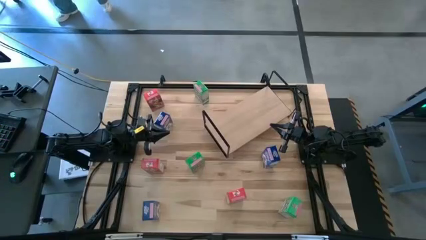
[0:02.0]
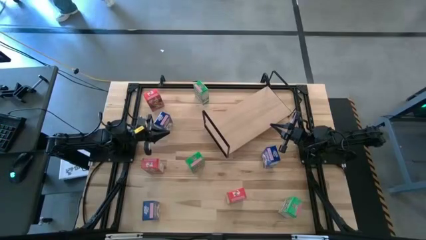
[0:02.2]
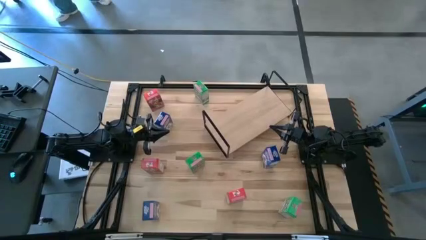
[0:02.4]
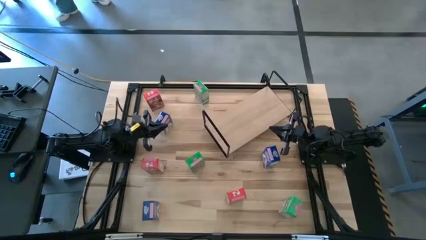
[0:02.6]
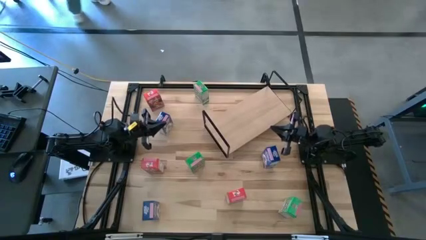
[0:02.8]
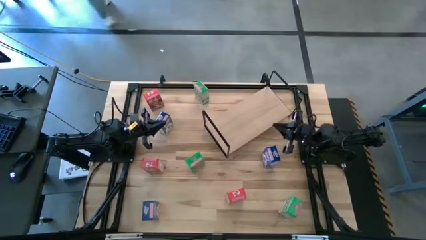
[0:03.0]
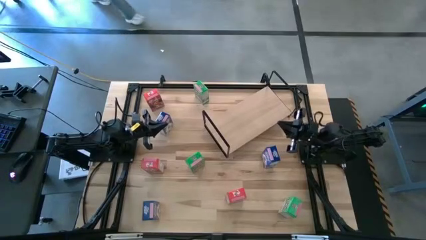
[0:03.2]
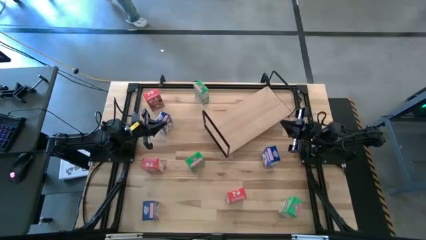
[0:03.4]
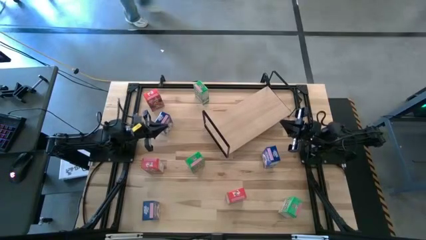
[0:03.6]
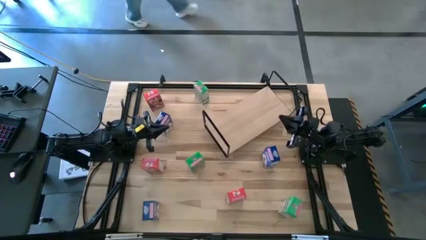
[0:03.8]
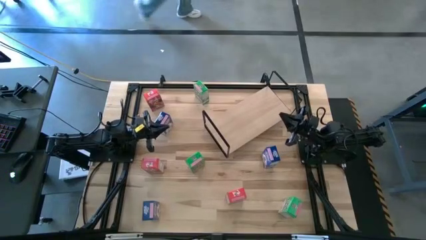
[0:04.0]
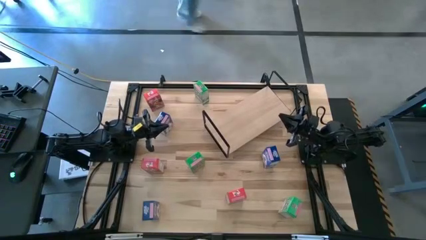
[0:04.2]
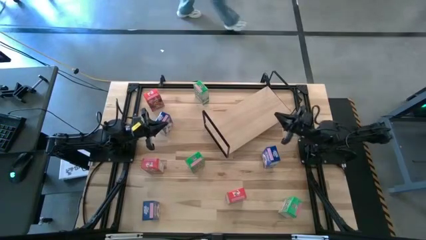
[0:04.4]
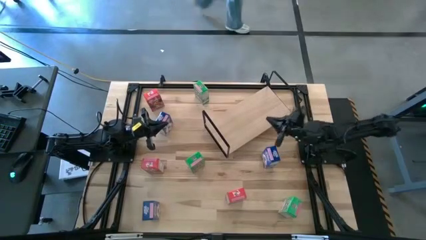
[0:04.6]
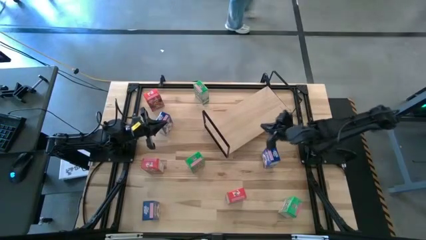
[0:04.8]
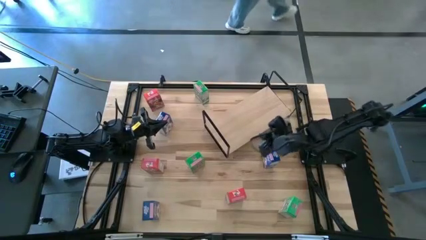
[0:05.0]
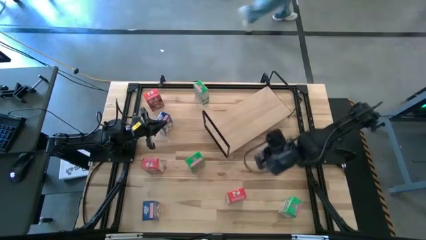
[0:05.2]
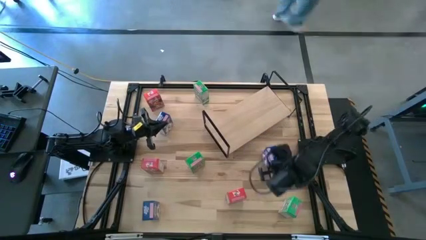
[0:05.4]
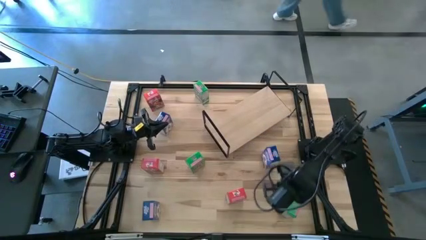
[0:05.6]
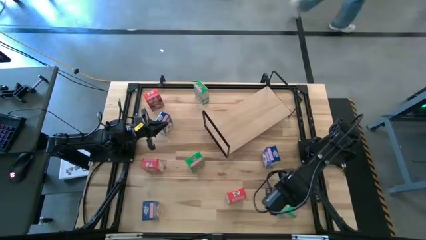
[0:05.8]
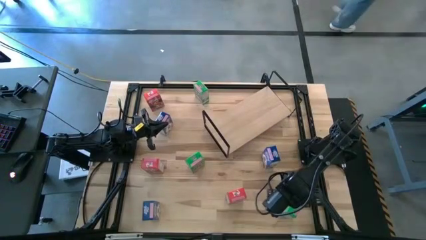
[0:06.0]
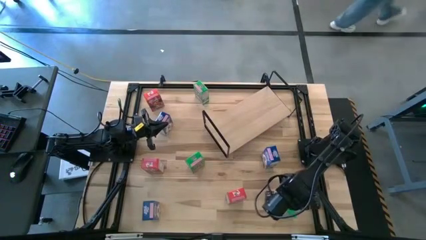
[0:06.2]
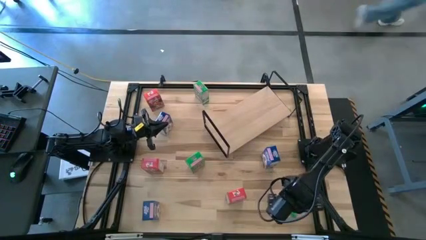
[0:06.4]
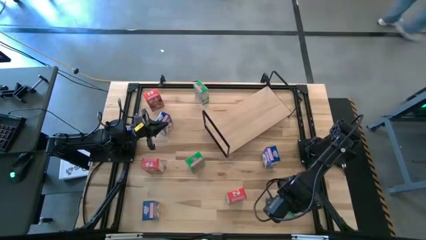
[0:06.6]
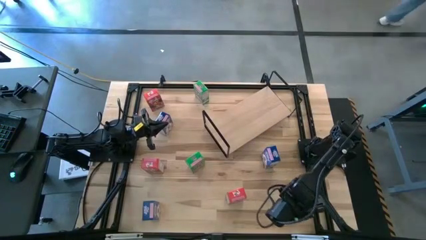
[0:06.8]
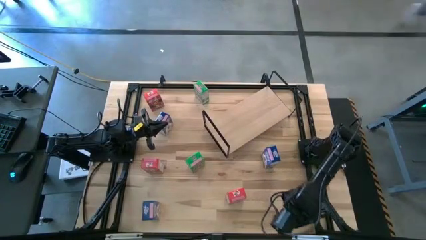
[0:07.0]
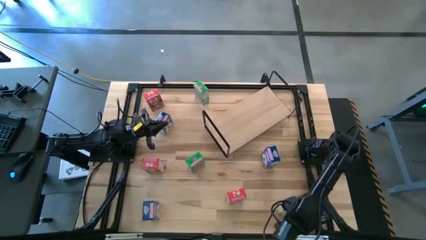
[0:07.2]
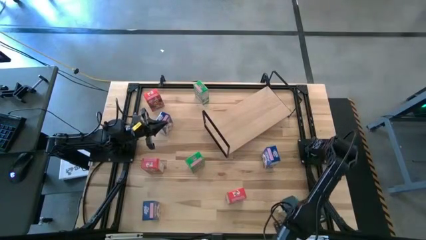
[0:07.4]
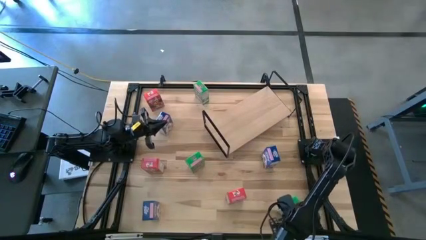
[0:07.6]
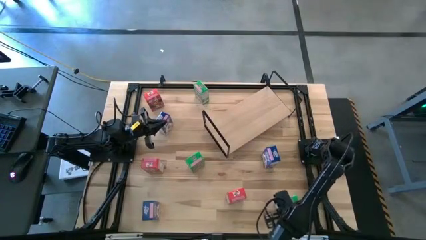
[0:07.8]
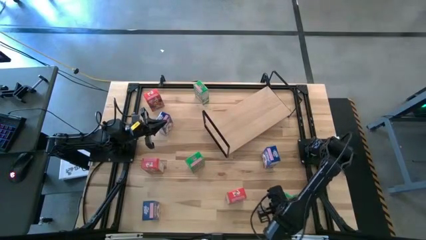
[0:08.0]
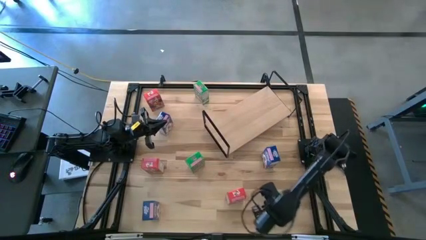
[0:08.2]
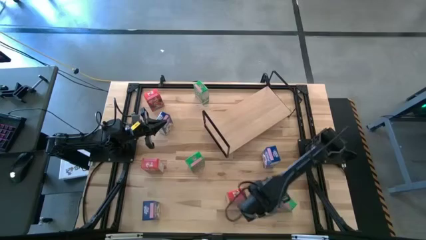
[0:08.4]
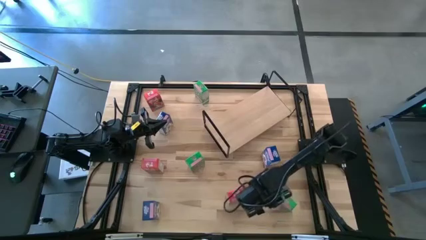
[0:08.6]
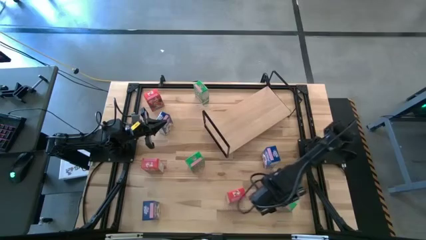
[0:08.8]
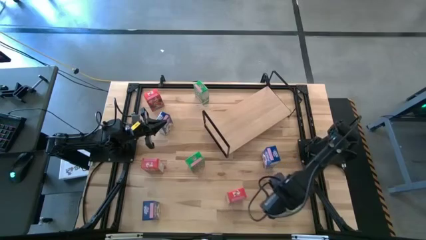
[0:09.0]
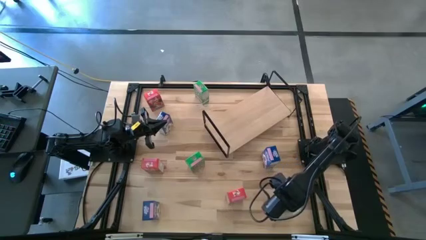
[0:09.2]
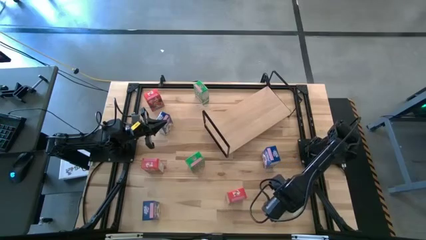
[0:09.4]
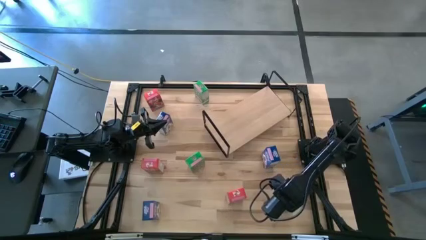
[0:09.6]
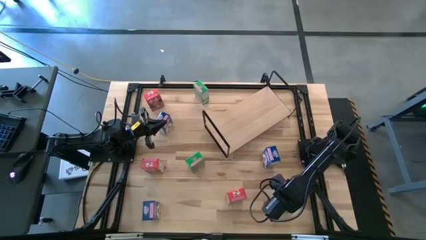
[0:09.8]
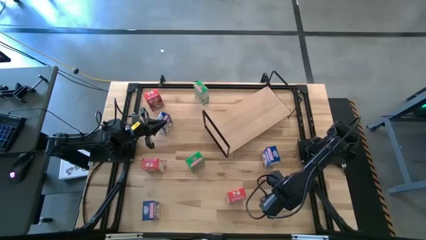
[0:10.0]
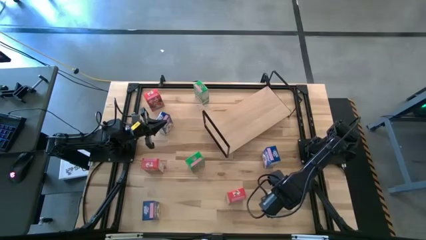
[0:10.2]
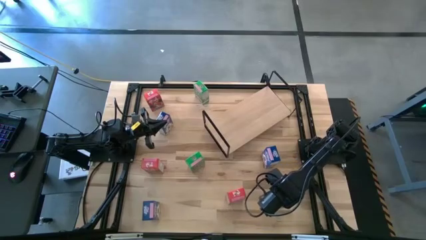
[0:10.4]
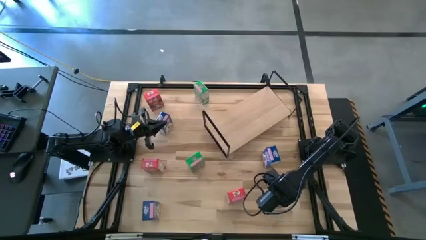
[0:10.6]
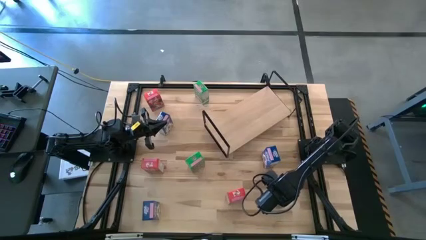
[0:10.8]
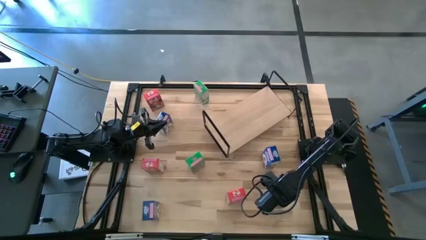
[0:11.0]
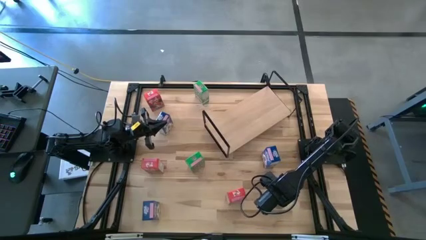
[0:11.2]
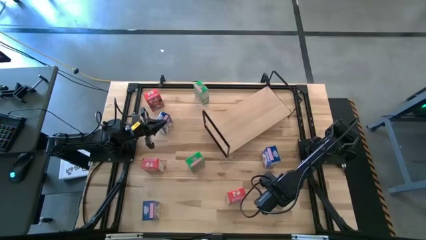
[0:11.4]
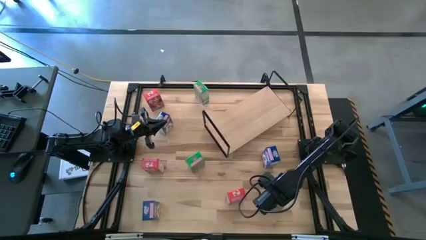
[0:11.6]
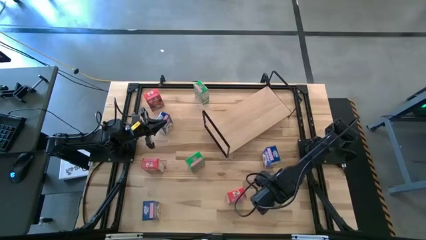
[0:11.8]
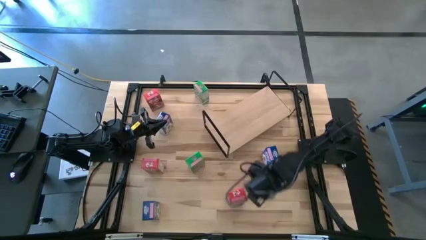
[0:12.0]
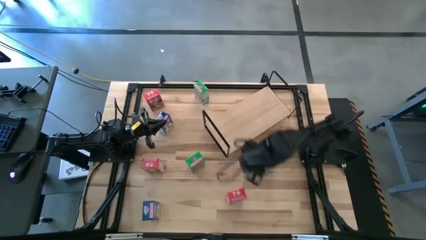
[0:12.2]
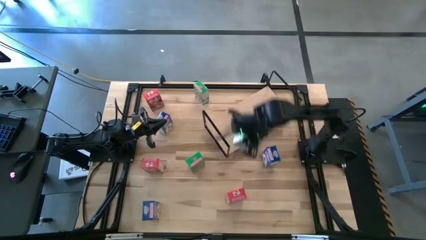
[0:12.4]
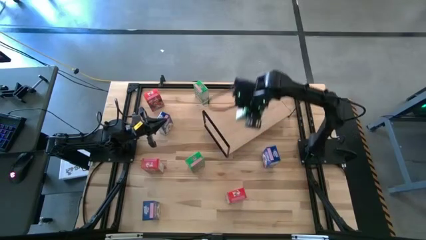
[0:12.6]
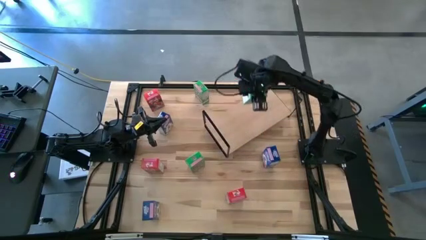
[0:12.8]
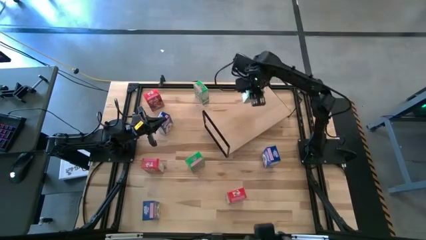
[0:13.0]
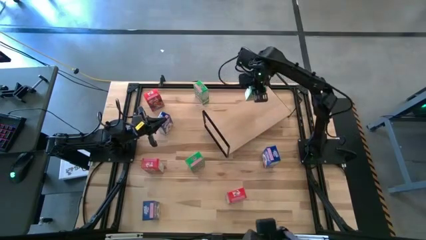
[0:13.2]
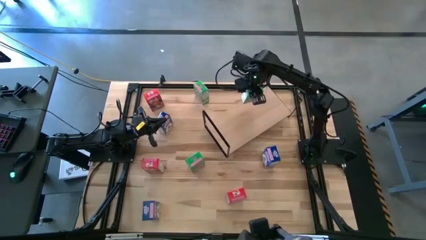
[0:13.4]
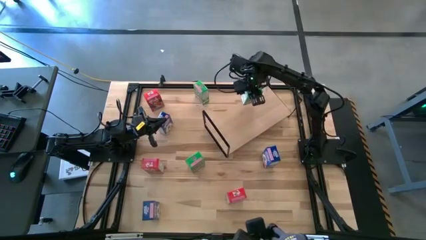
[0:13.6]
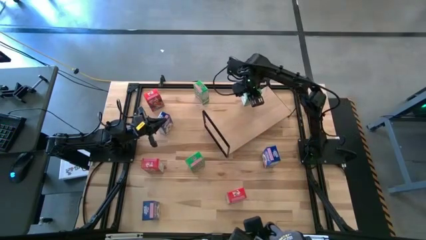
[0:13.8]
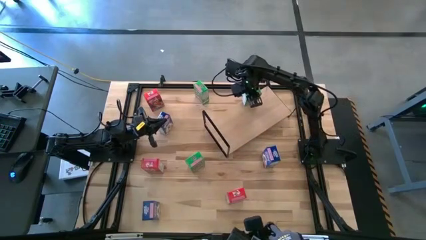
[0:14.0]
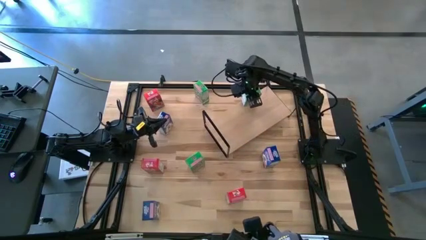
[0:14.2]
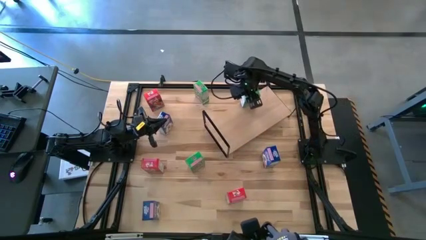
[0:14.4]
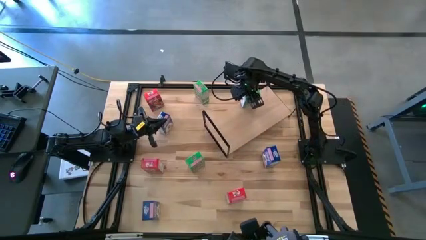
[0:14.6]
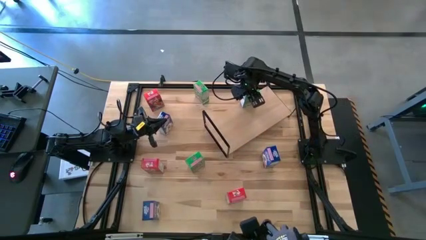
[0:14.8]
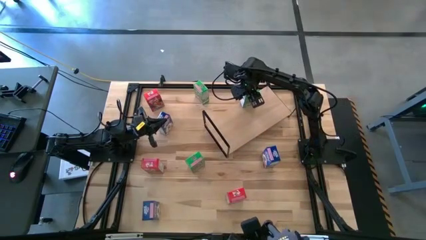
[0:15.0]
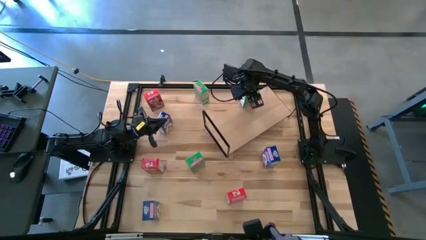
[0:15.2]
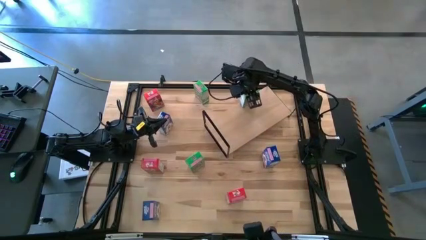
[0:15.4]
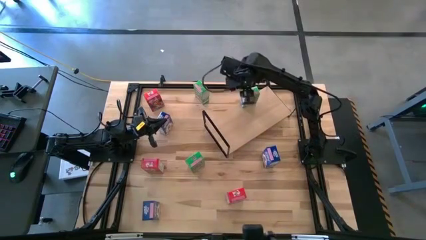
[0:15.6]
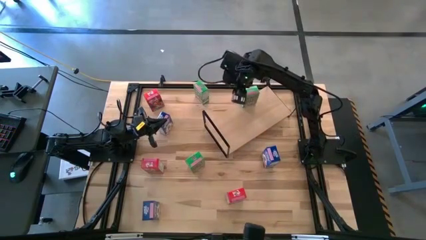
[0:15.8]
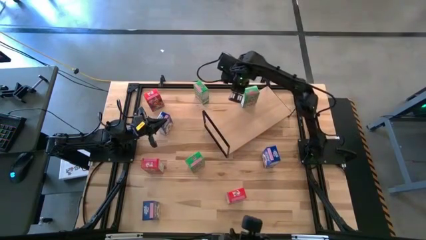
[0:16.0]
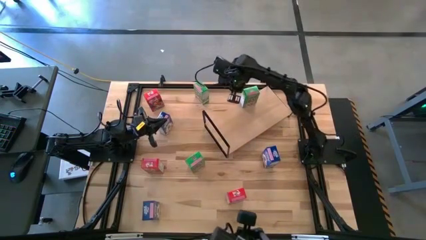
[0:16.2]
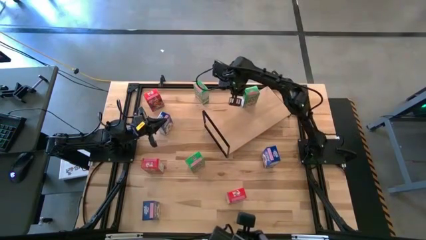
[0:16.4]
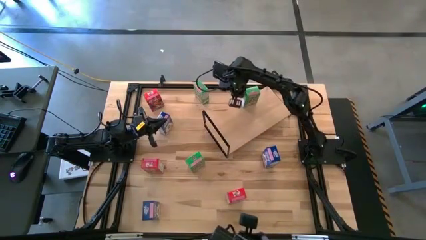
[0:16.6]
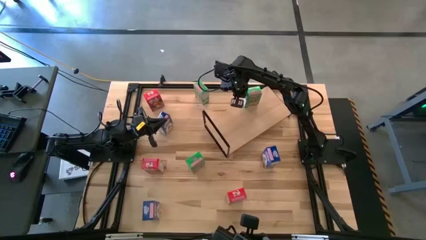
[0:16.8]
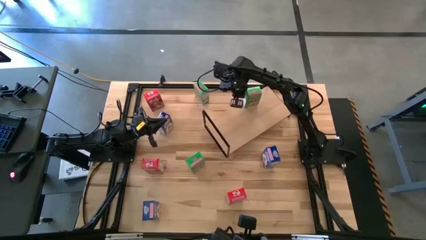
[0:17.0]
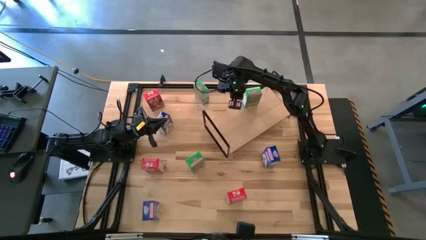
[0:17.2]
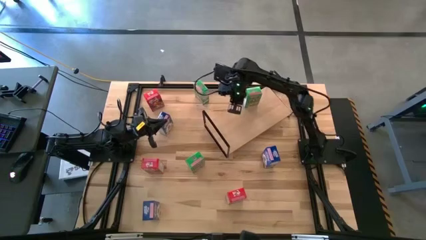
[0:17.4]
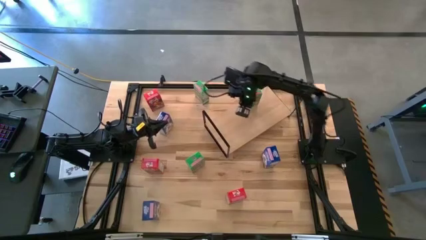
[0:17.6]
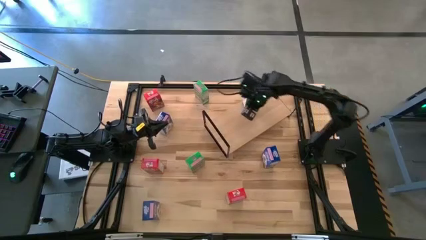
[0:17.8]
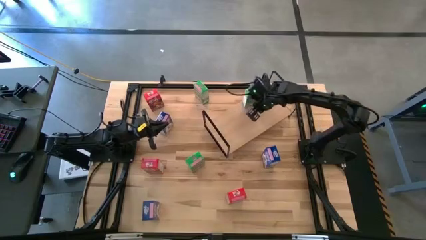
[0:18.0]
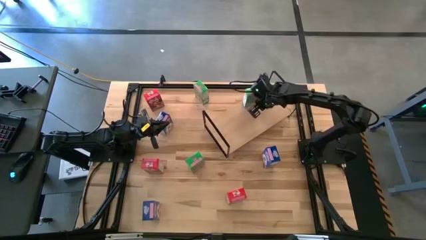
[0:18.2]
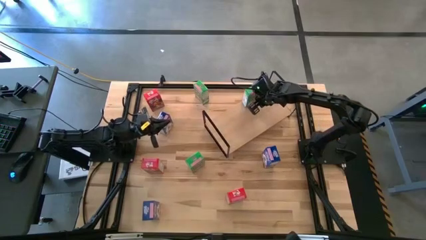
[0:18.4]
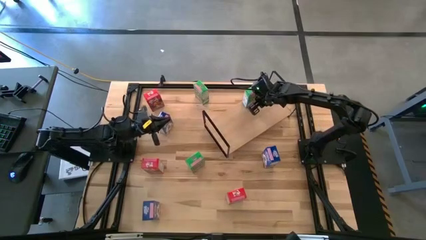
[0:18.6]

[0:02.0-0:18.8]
Task: Stack cereal on shelf
Put the bottom green cereal box on the shelf
